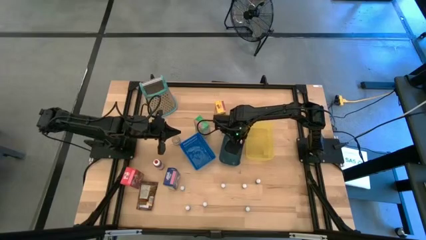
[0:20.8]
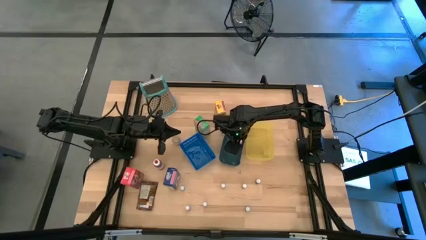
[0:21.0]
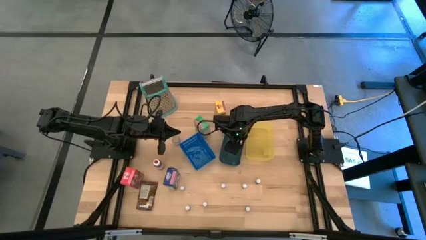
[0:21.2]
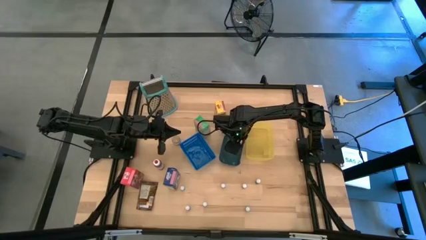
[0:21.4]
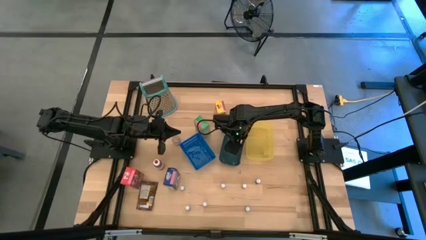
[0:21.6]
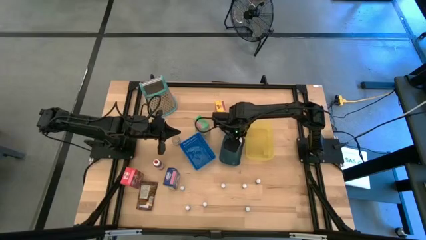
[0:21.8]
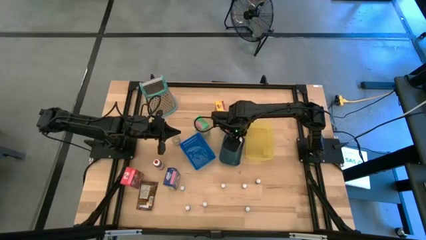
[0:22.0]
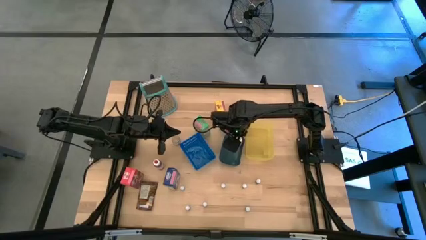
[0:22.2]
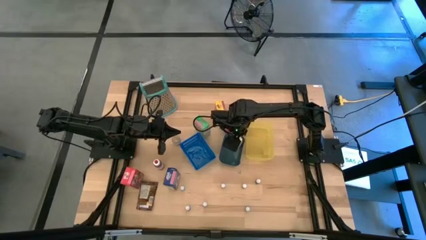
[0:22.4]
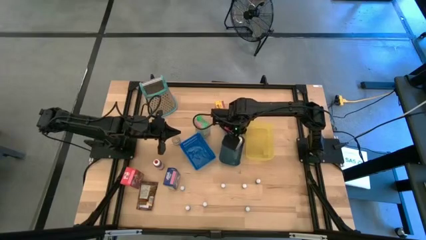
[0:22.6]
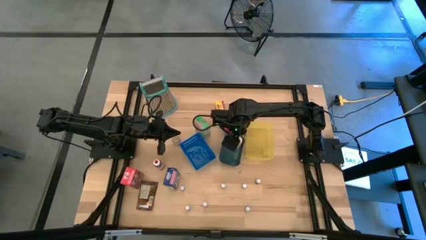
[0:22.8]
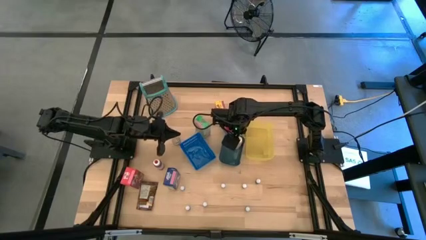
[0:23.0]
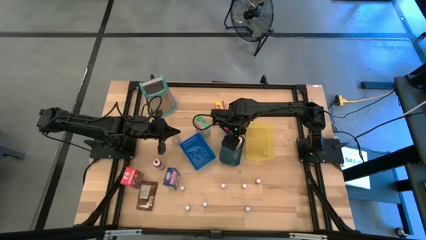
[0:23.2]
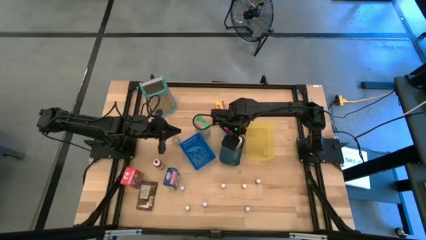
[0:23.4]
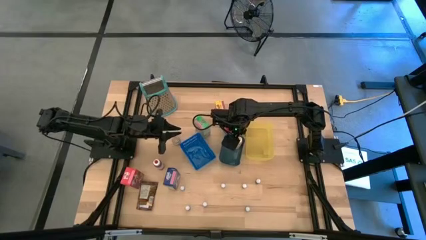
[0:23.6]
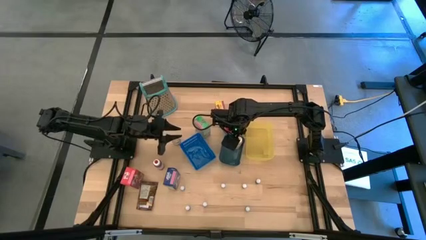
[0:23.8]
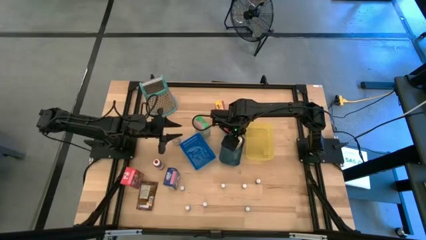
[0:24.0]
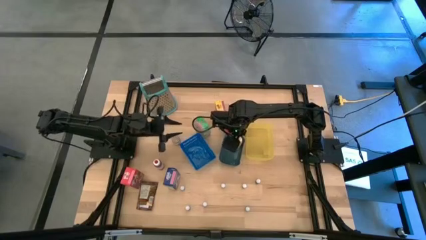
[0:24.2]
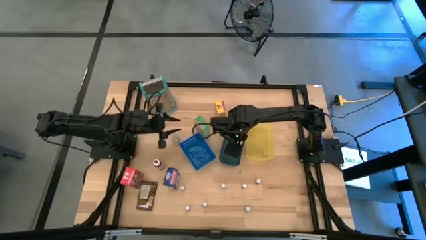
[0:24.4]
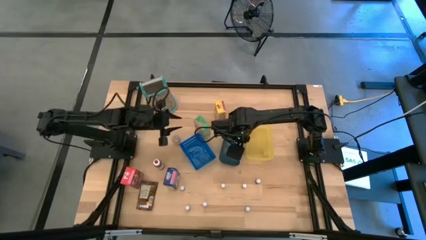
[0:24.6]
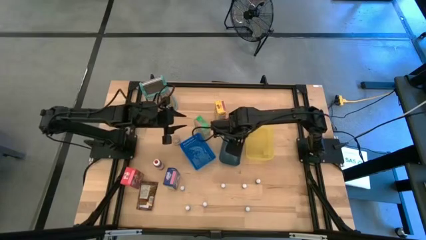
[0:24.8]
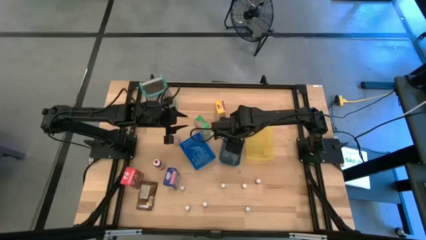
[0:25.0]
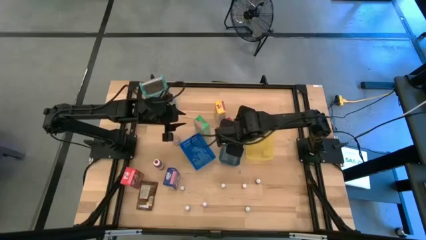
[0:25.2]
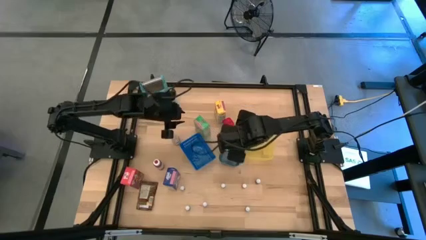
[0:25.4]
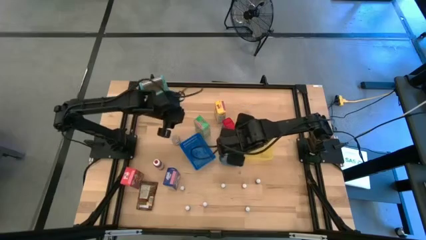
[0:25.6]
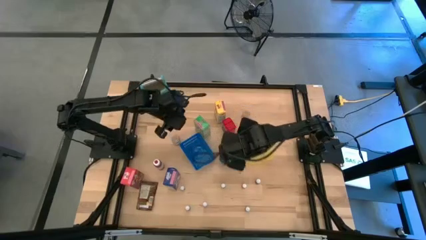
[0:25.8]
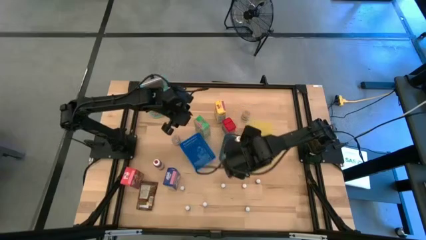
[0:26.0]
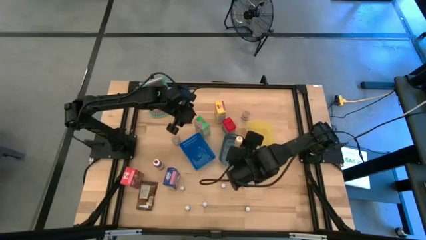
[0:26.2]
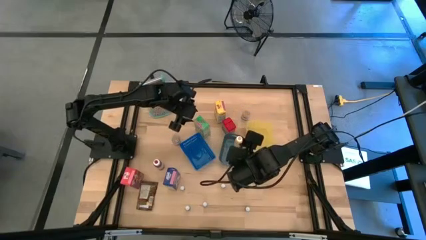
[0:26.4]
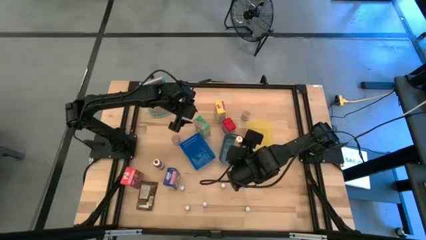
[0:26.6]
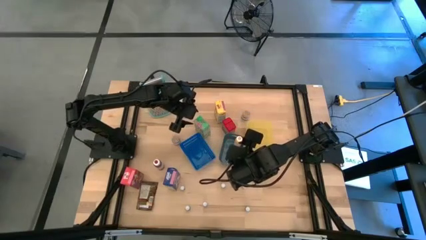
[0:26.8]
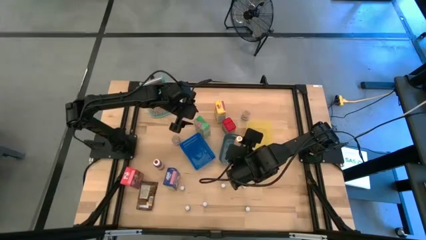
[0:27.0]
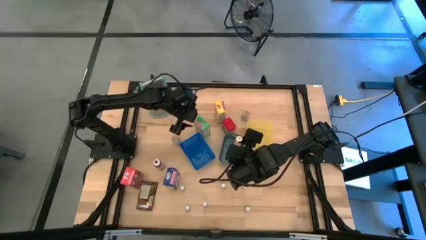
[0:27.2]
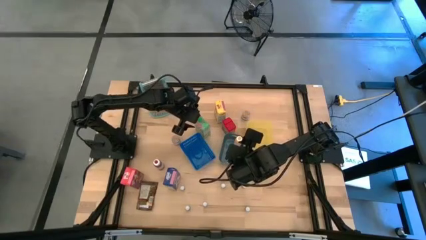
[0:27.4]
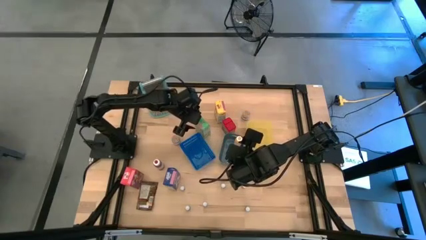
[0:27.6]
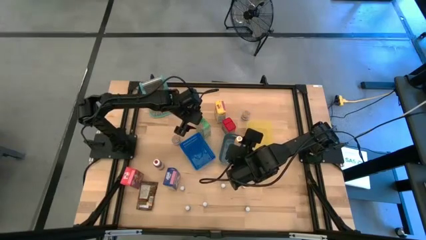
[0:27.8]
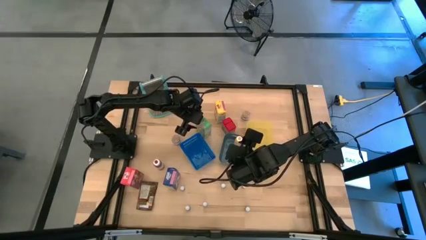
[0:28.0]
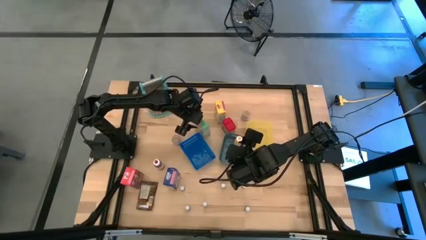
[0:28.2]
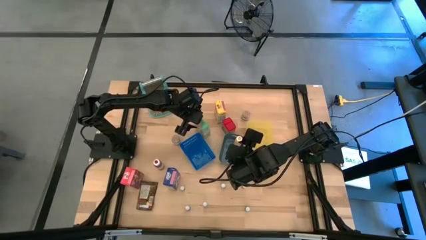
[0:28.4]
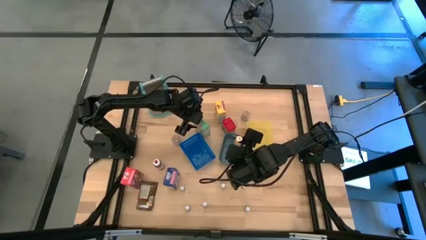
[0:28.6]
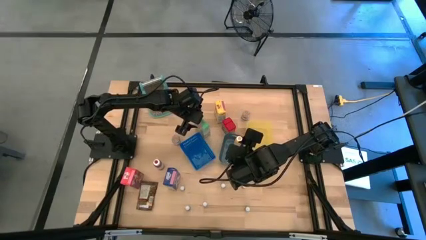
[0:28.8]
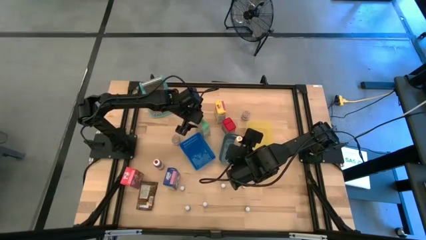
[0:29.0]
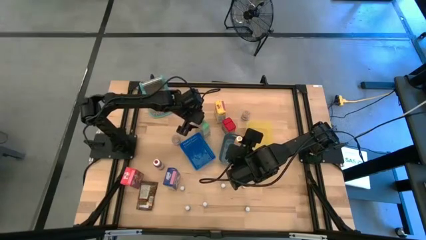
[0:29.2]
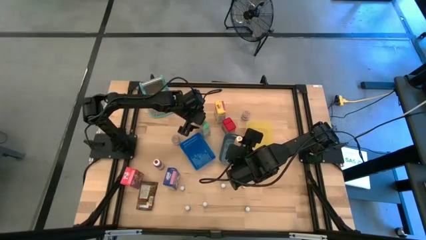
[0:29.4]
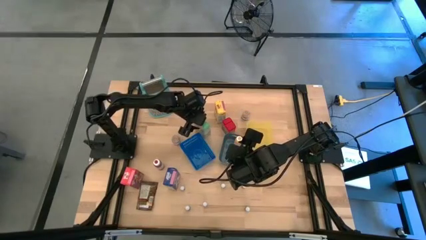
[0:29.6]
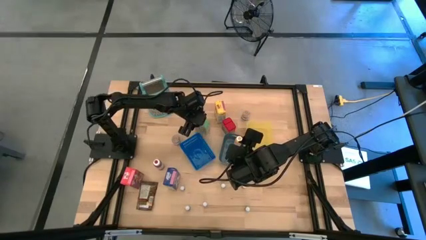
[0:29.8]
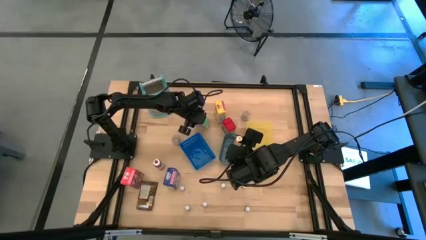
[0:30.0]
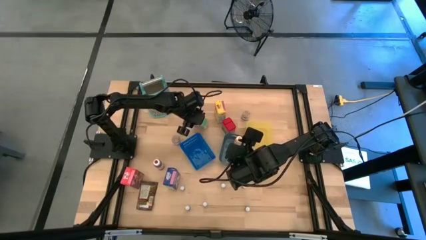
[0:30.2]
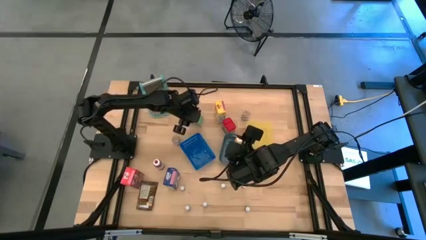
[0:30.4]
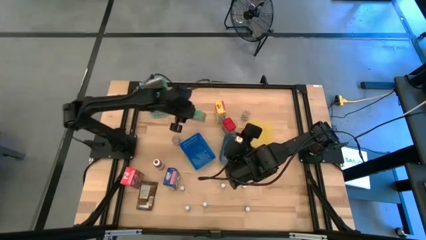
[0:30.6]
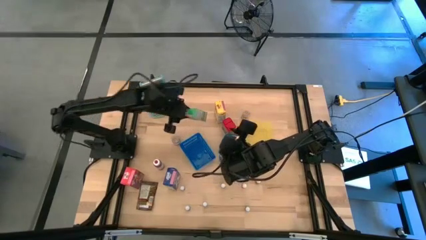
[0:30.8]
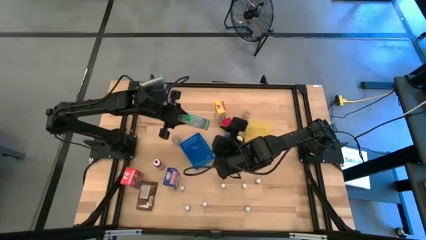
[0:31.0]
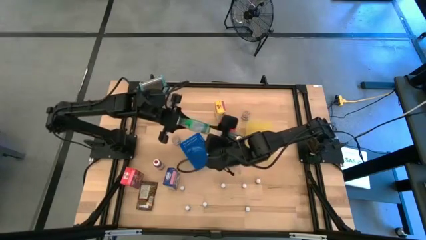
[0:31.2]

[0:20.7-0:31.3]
Task: Pick & Place Kitchen Items
Put the green cereal box into the yellow bin
